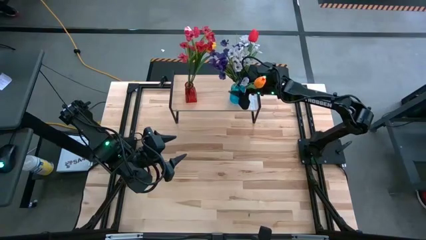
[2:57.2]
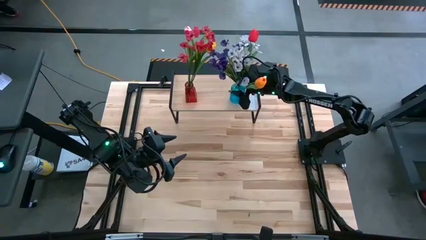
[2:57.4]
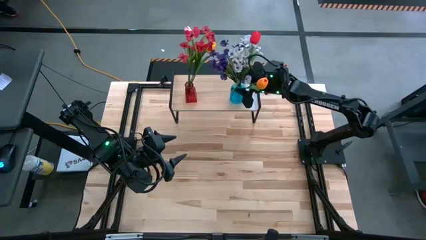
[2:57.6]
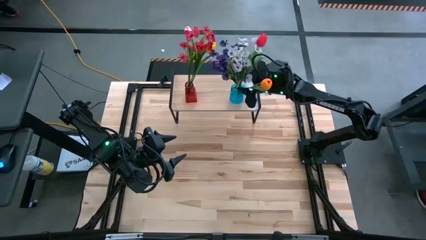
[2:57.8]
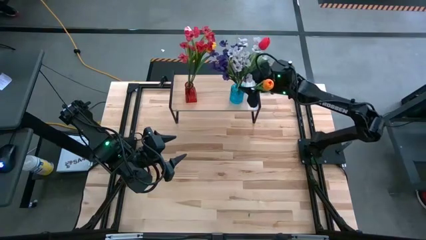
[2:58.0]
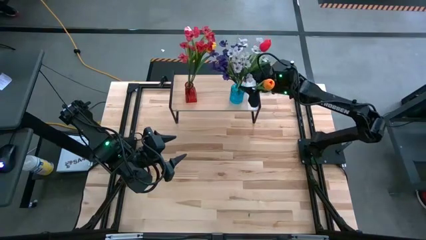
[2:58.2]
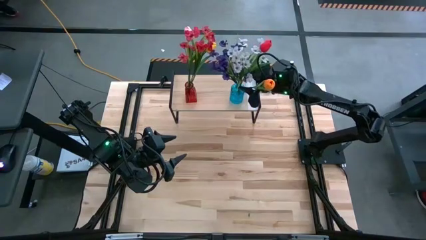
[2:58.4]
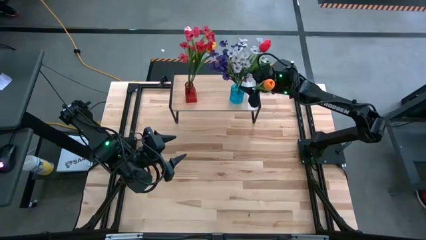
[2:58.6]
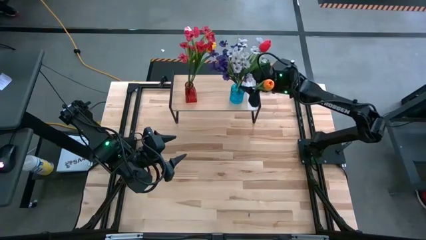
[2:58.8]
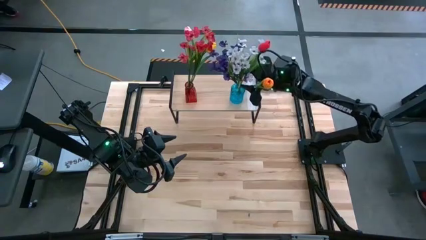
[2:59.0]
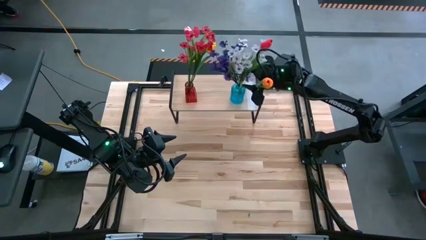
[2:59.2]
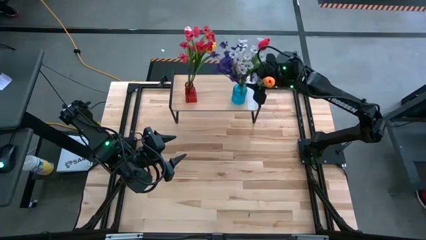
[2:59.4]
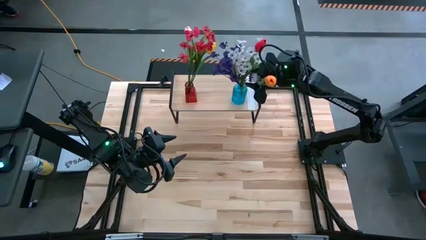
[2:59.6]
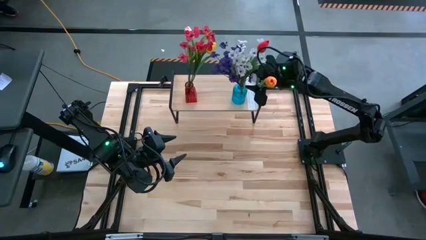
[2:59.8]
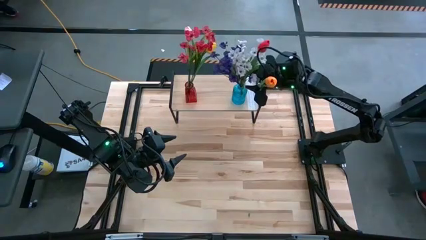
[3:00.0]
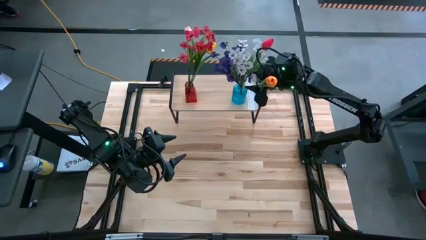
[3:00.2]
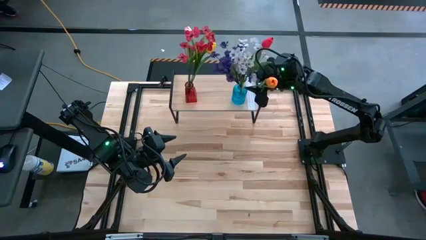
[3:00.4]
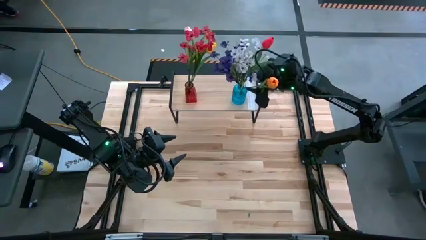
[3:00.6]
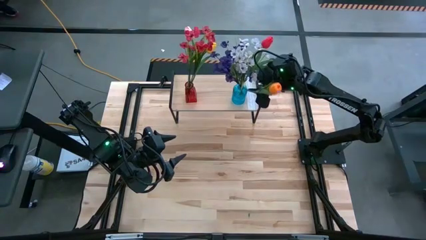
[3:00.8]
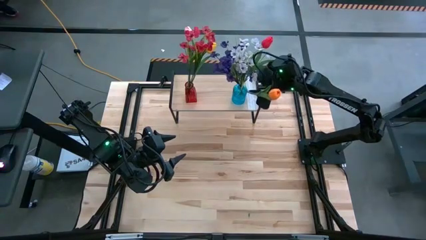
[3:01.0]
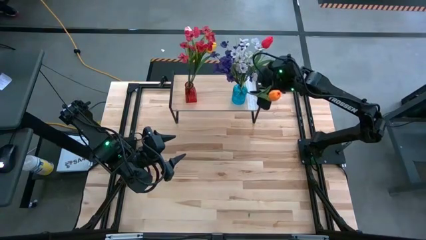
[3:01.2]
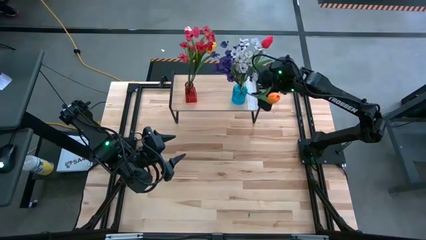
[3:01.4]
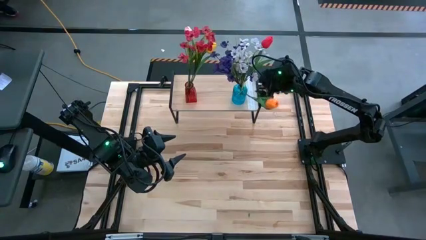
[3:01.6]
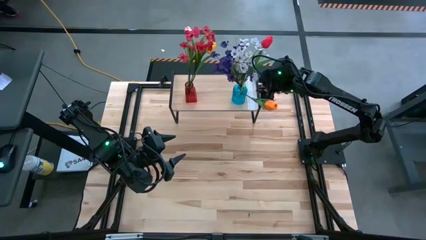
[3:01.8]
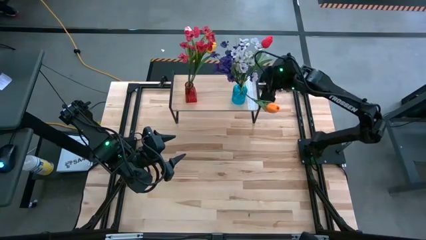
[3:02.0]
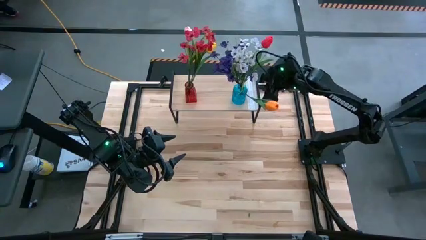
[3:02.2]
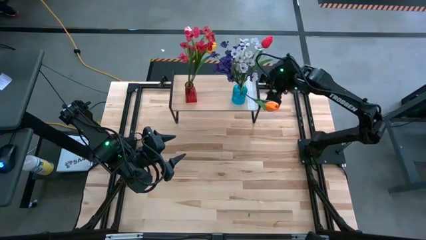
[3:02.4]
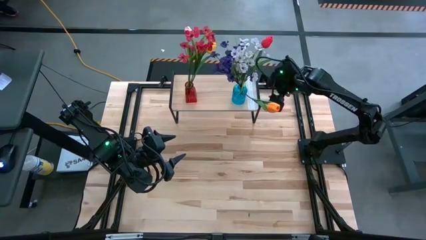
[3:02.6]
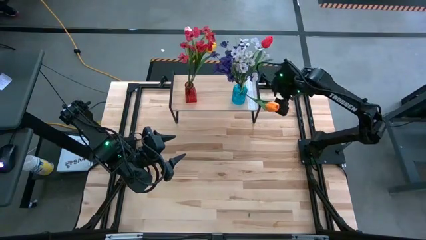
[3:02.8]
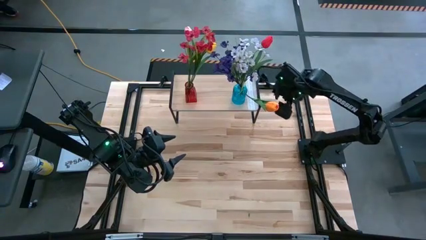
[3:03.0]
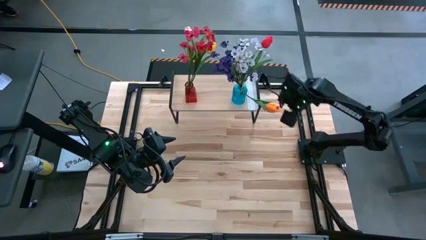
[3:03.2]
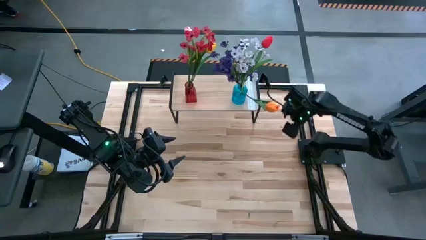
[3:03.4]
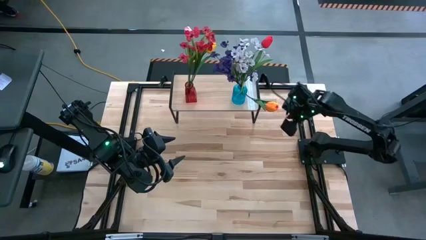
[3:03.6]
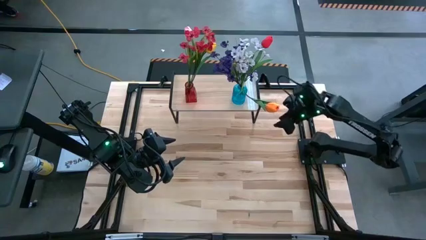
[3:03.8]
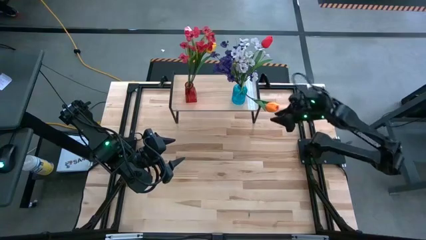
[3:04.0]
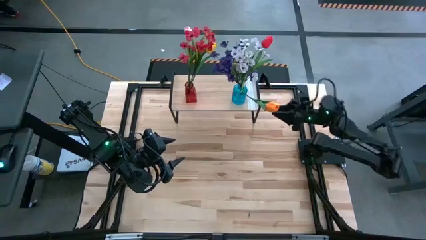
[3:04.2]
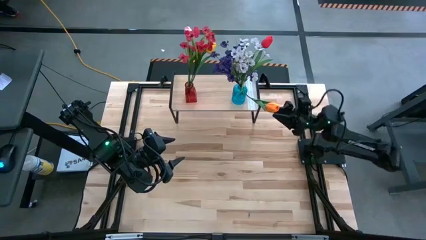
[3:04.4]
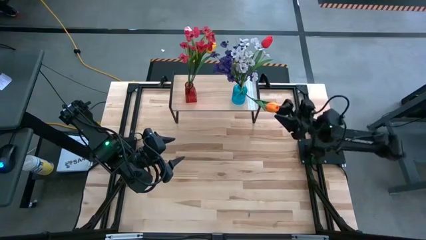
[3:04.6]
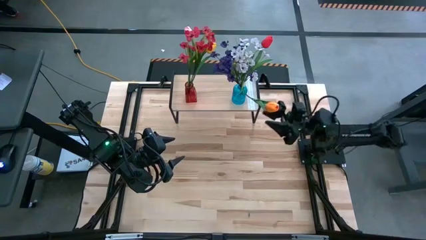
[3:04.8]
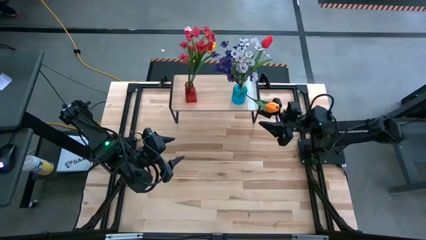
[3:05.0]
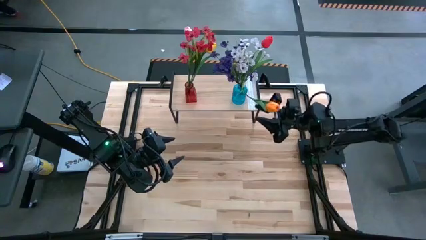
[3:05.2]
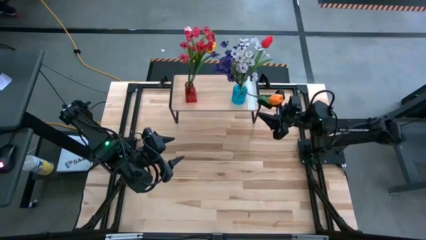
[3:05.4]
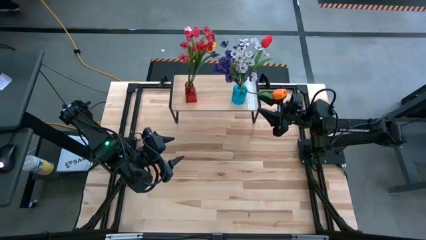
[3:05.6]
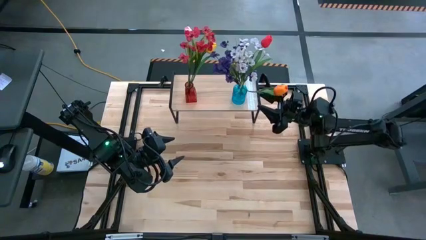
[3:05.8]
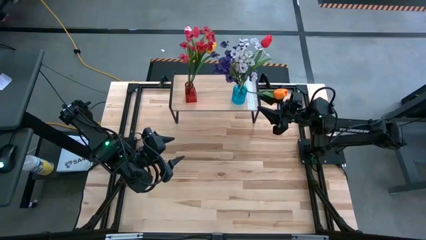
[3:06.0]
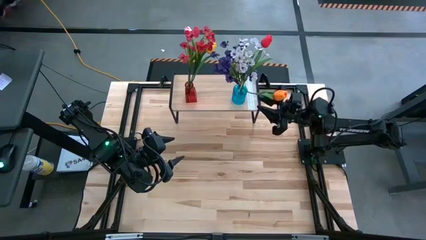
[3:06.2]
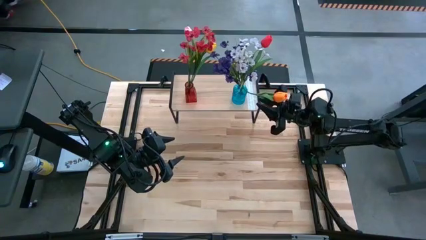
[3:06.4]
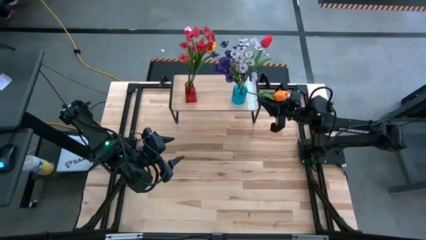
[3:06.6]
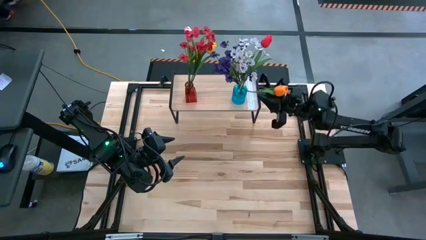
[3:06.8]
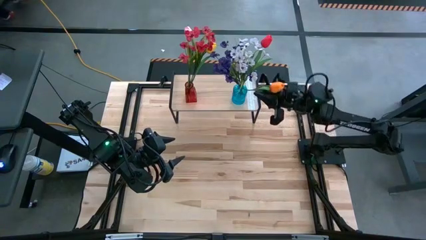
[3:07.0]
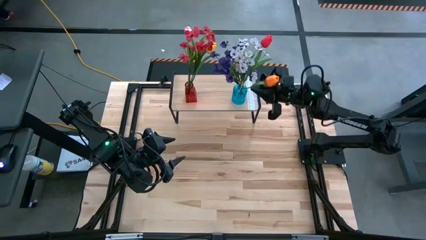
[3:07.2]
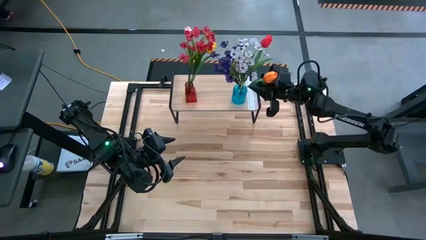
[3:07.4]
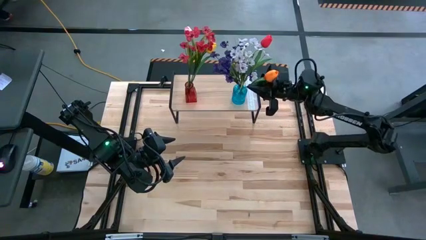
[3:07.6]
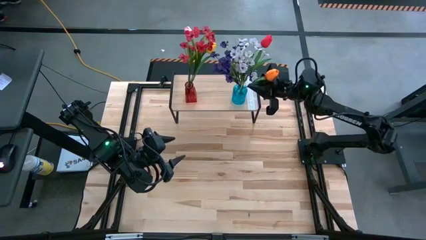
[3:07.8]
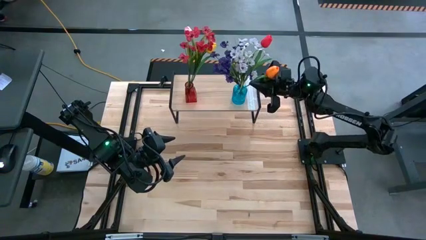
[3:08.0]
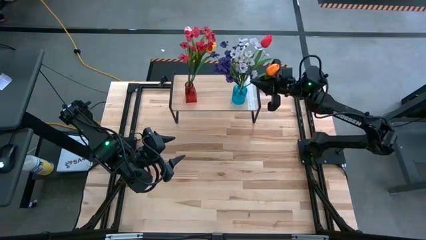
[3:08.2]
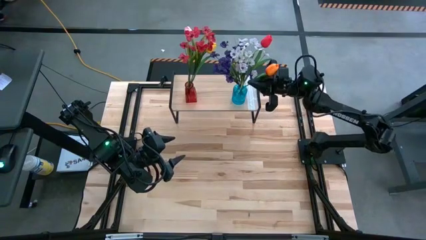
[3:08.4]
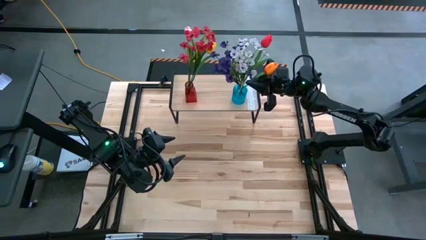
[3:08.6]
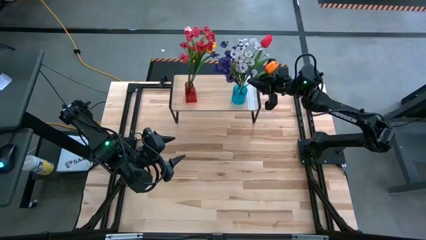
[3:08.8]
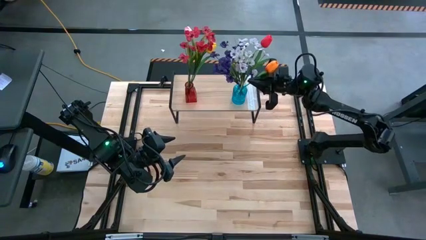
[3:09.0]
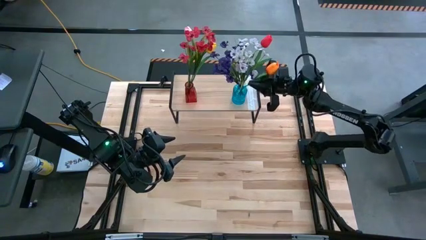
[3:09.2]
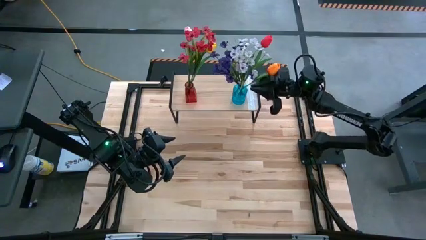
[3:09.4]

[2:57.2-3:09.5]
Task: Pick and place flowers into a vace then onto a shelf
Adjust the orange flower in the blue vase

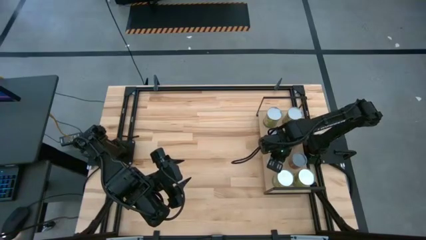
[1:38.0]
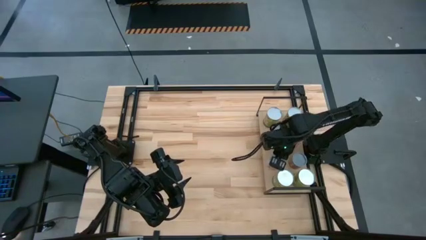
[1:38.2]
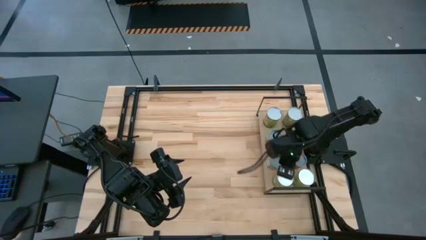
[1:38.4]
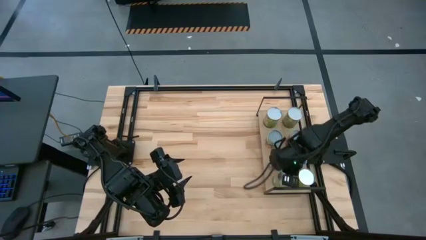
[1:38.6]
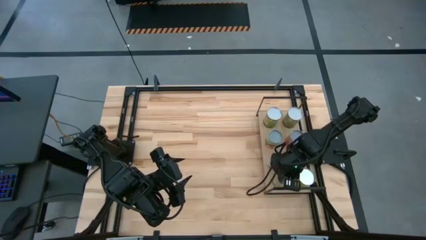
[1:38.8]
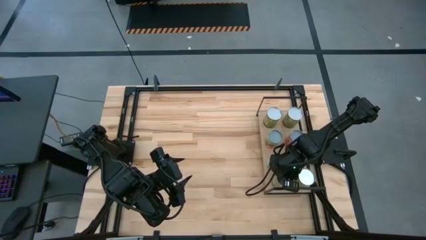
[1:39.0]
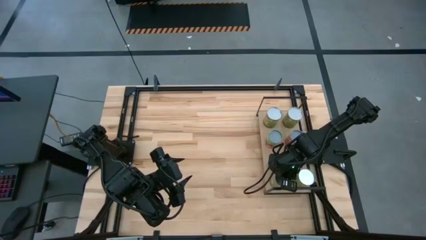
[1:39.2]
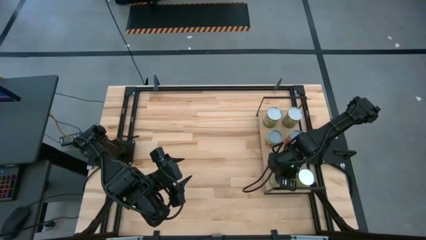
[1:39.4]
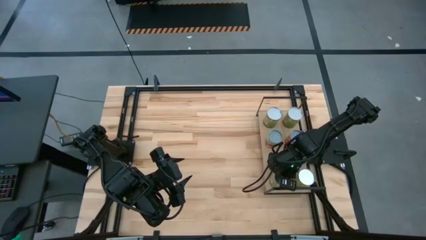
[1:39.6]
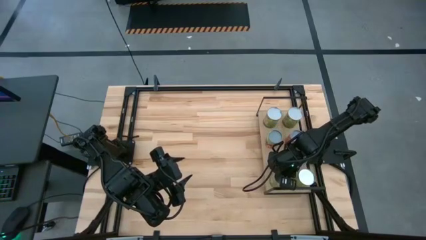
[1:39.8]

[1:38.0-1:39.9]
Task: Pick and place cans onto a shelf
Adjust the canned peas on the shelf
